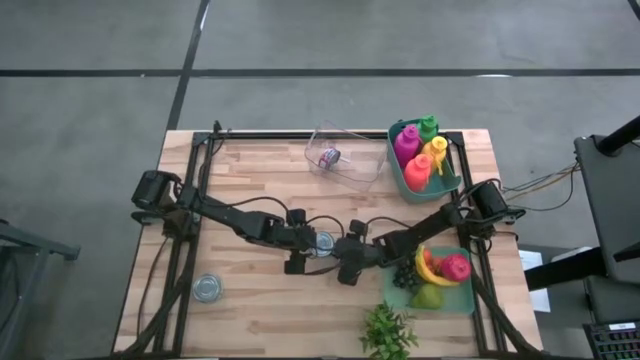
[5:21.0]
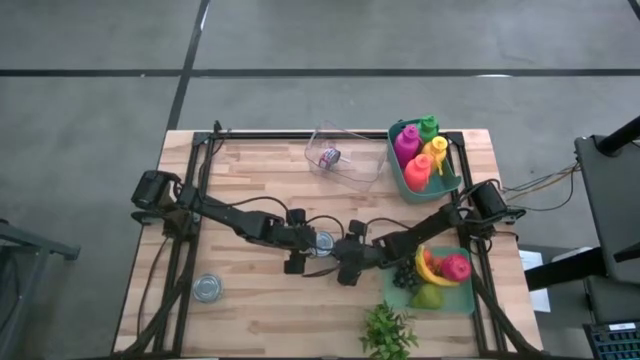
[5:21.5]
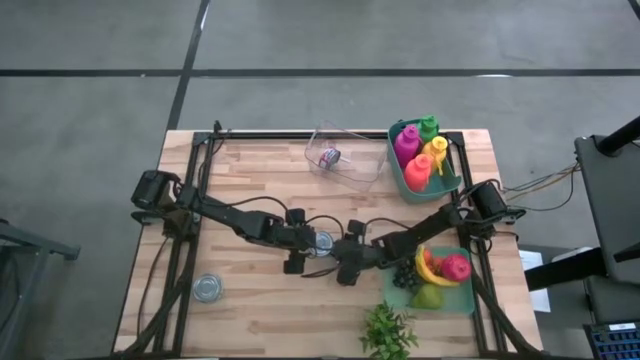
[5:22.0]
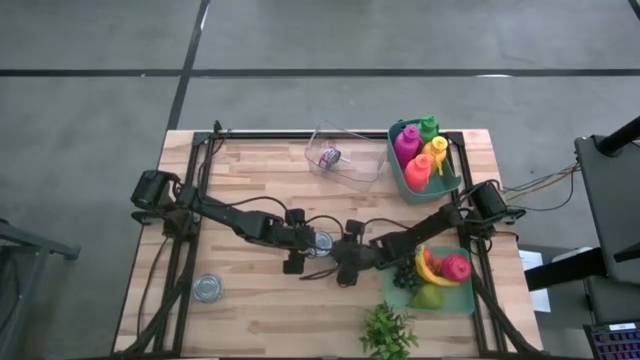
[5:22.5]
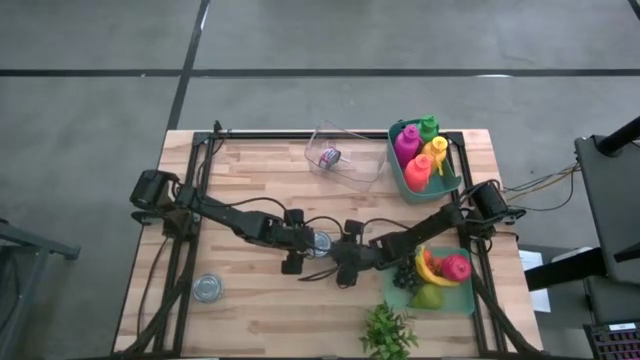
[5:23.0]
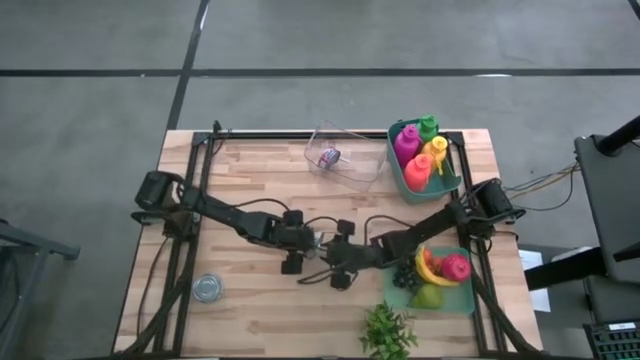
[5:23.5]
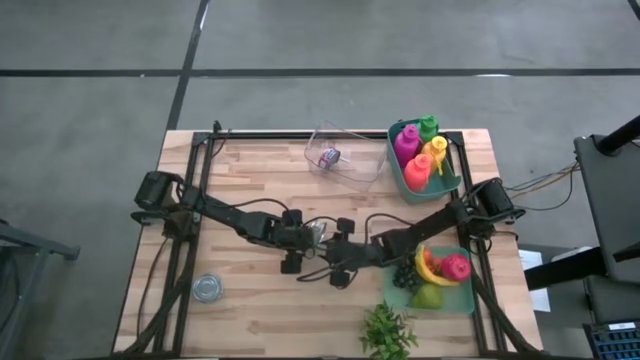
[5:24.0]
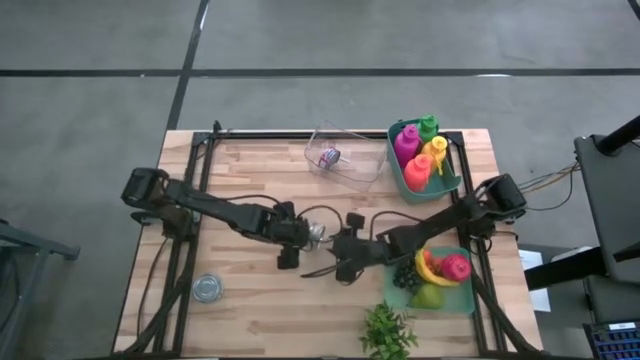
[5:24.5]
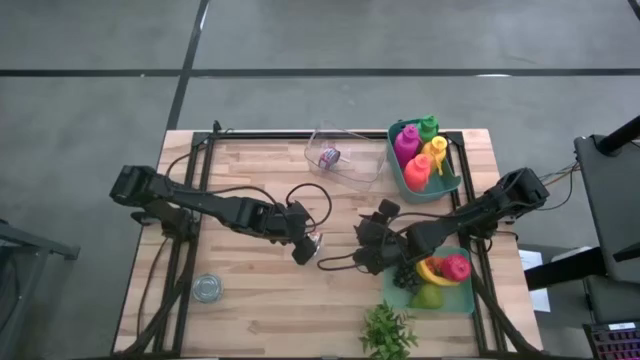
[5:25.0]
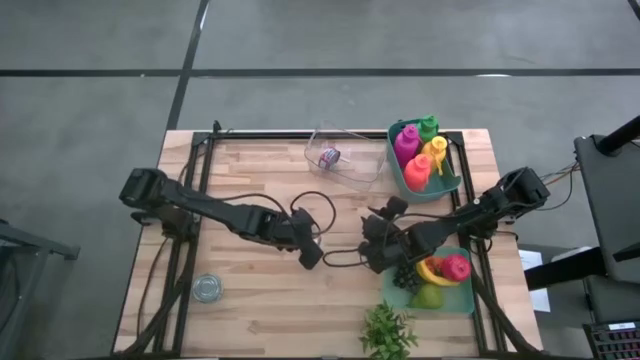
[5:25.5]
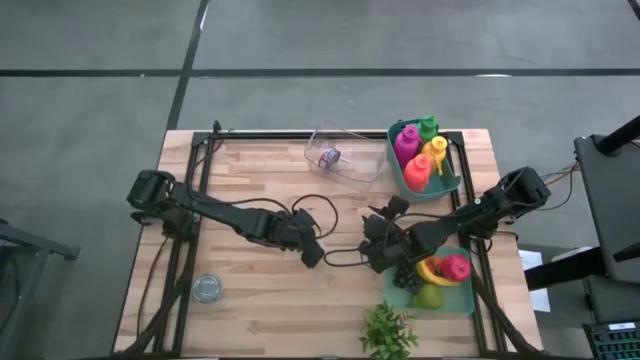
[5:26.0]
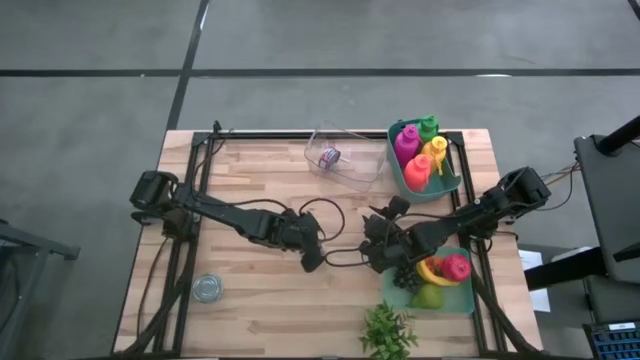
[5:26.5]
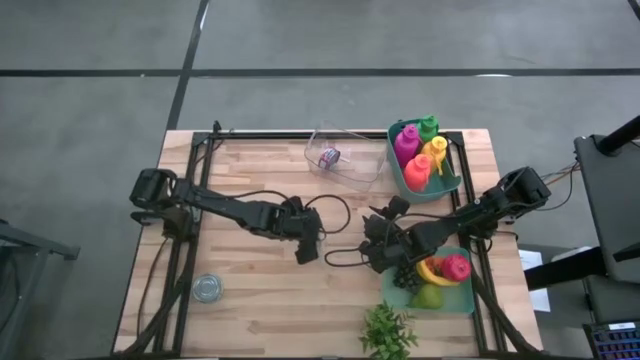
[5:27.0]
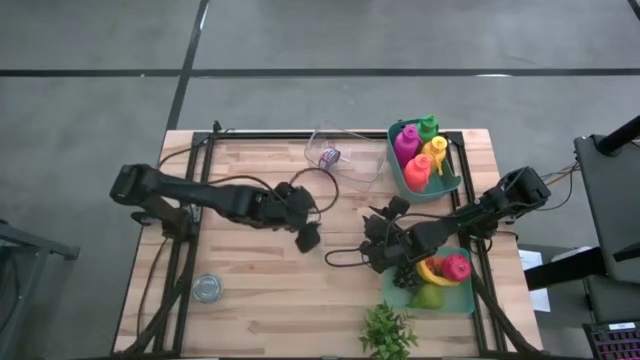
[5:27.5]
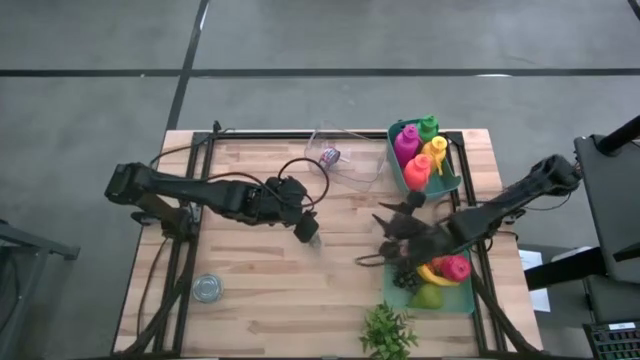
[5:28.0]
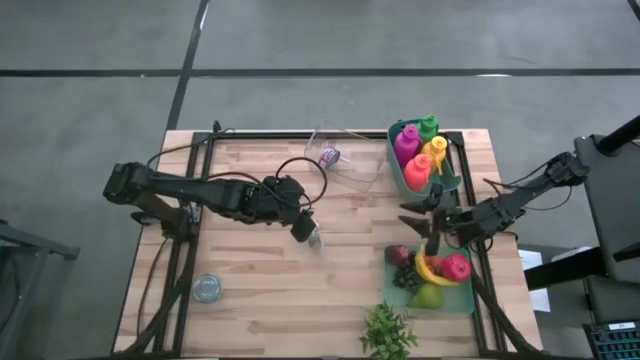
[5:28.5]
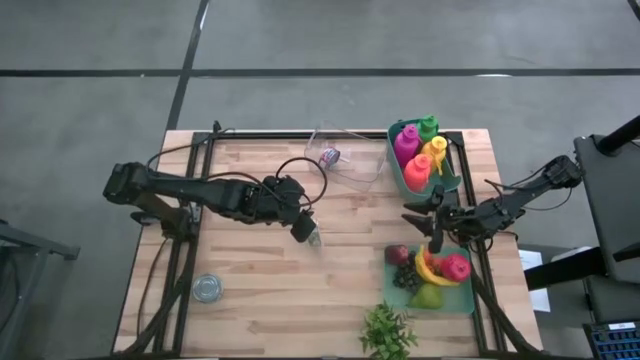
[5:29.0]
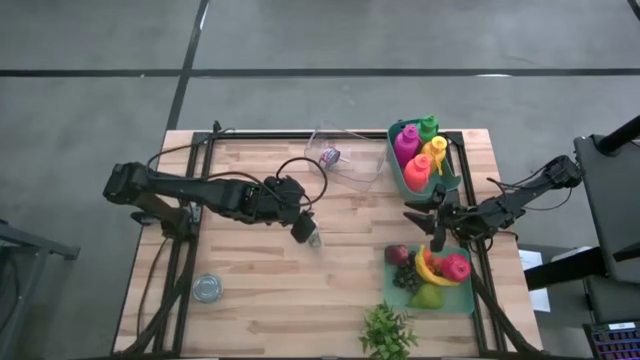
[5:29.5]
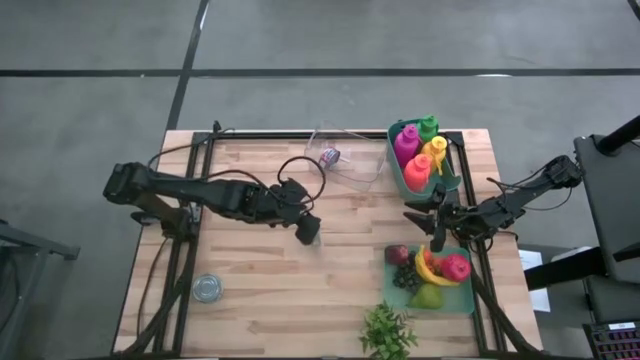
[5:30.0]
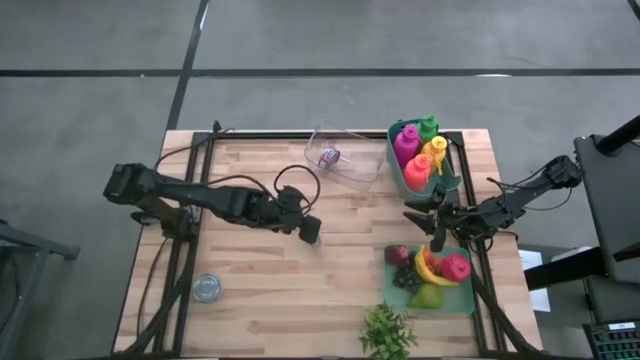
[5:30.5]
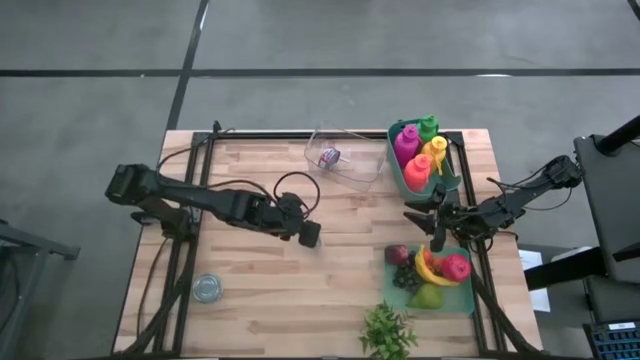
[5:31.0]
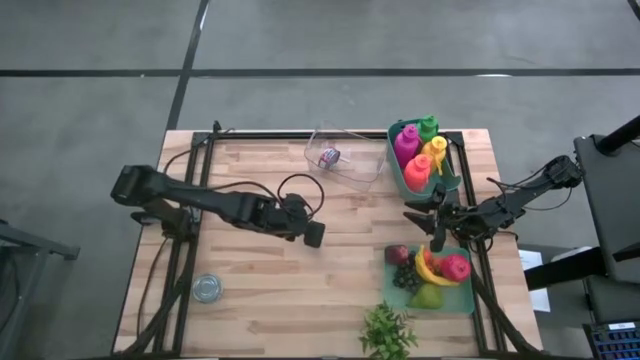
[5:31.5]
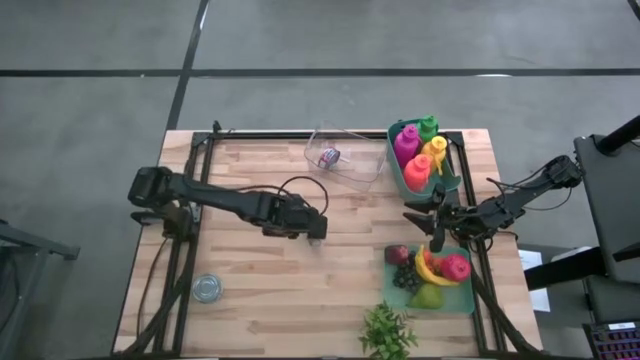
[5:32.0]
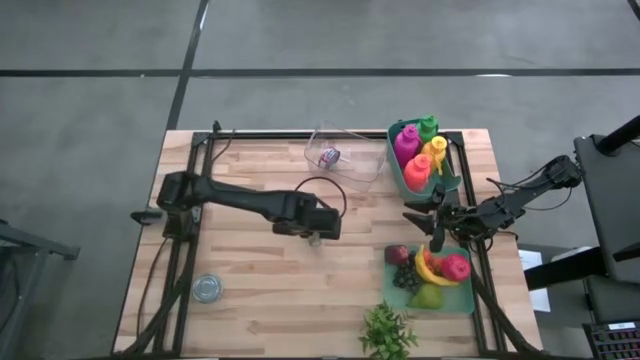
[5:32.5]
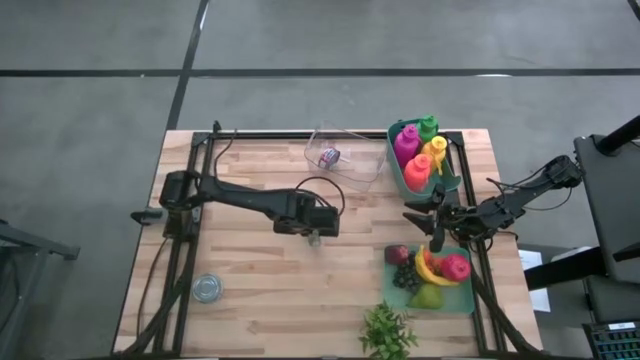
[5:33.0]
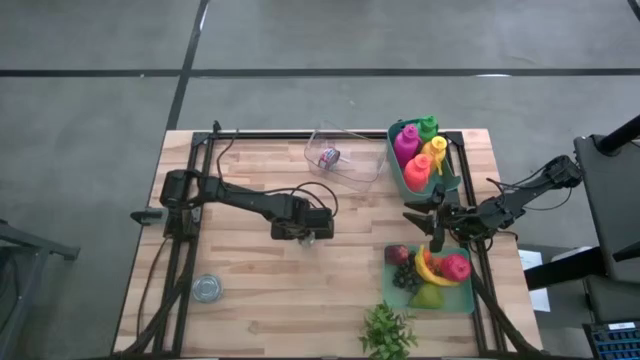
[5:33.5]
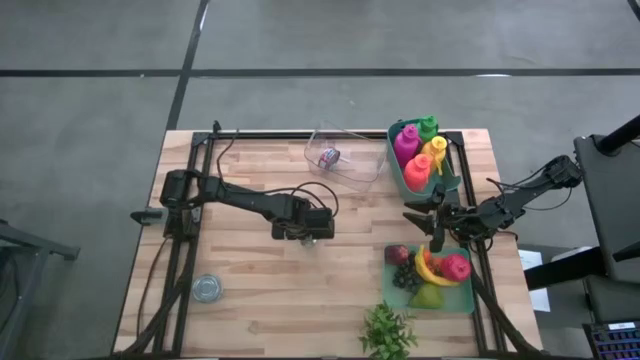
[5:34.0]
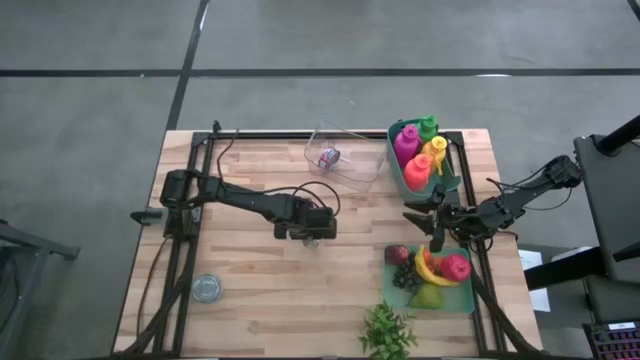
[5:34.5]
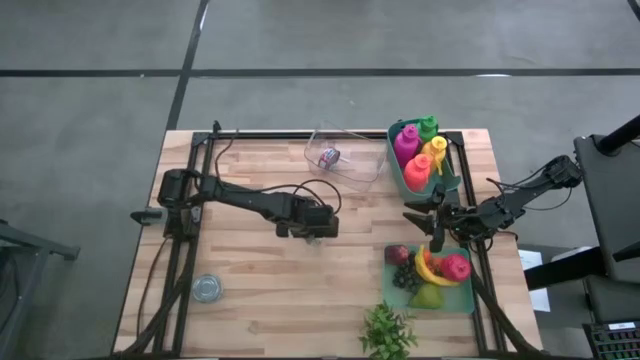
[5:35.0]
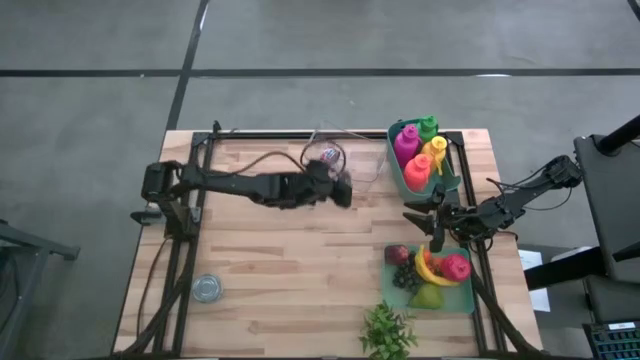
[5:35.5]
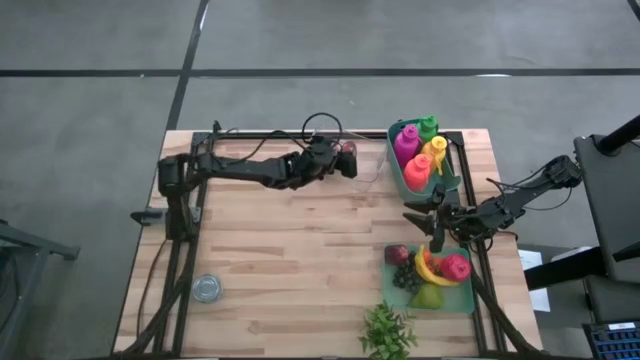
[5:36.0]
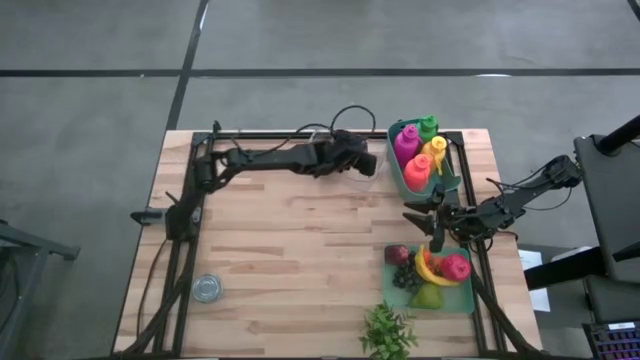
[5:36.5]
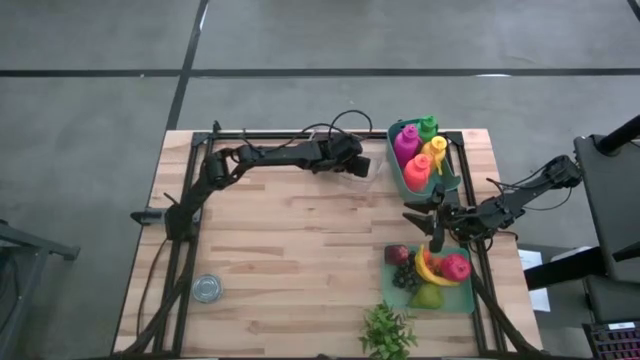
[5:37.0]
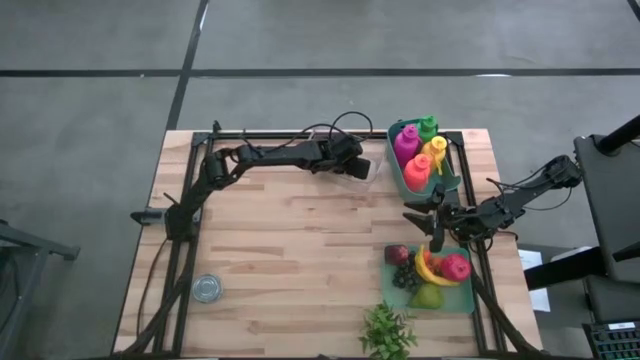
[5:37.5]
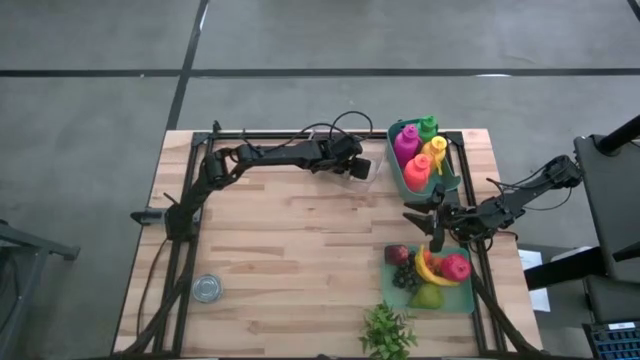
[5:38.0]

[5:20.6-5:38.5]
Task: Pick & Place Food Item
Put the right green tuna can into the transparent bin

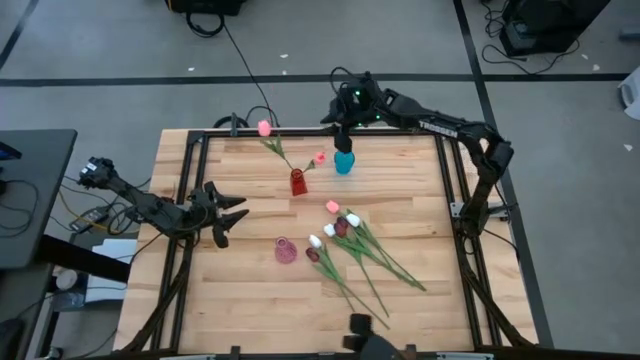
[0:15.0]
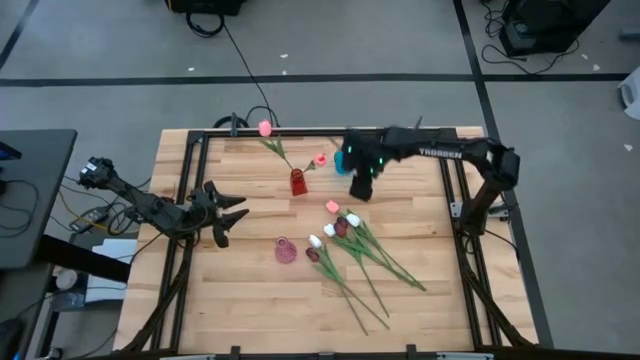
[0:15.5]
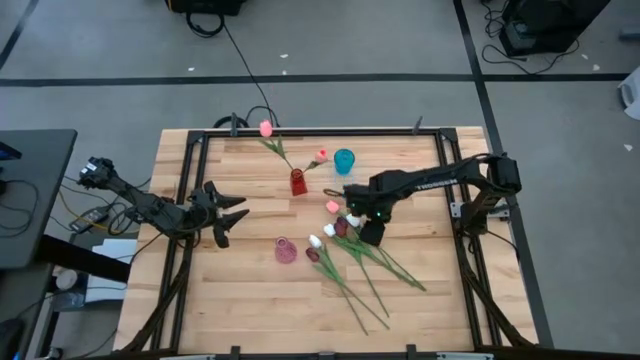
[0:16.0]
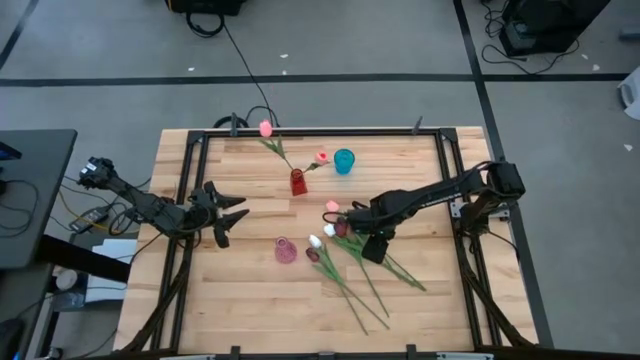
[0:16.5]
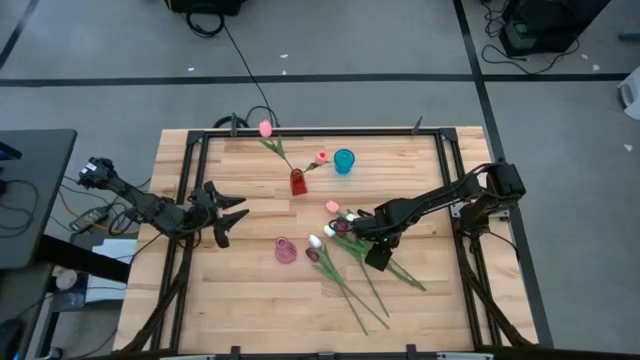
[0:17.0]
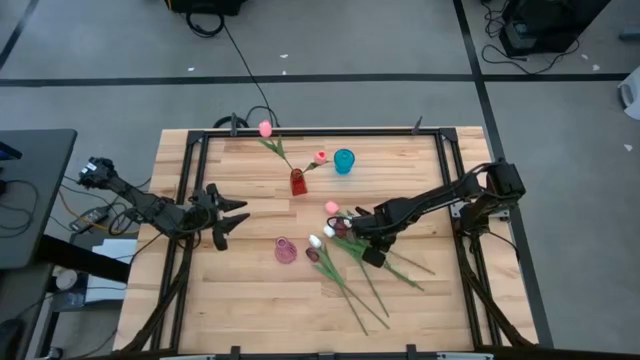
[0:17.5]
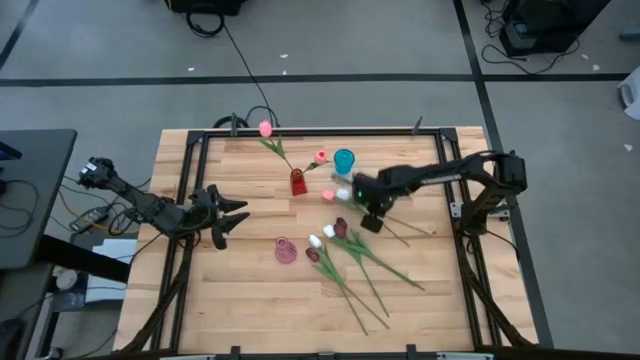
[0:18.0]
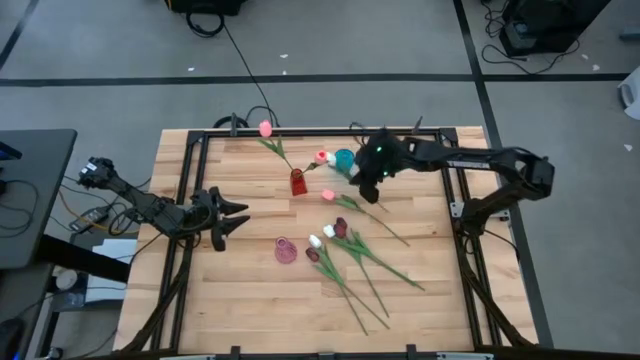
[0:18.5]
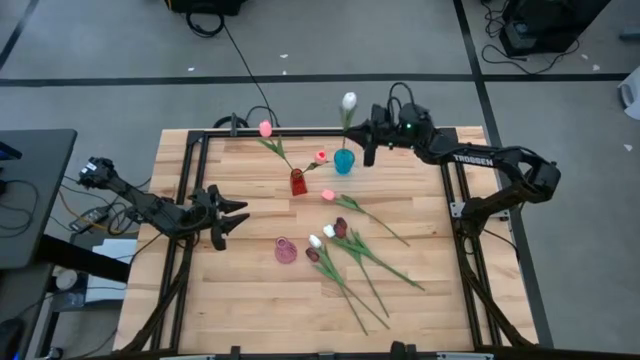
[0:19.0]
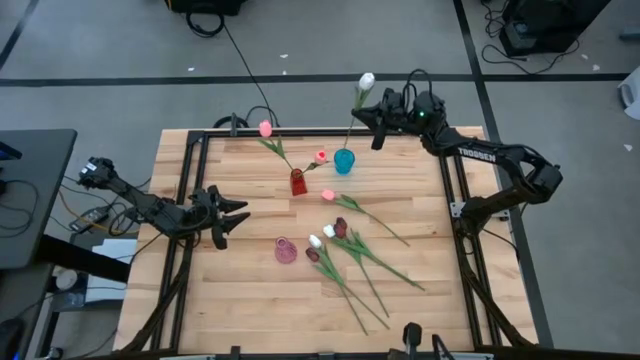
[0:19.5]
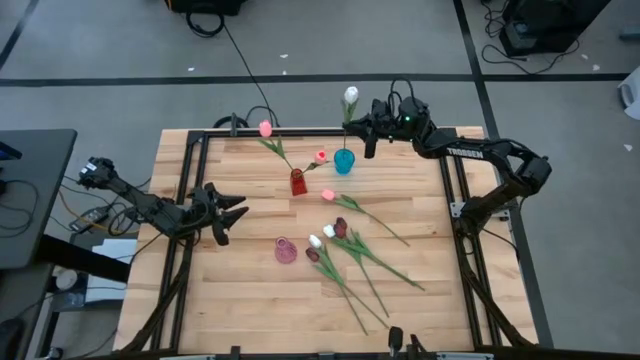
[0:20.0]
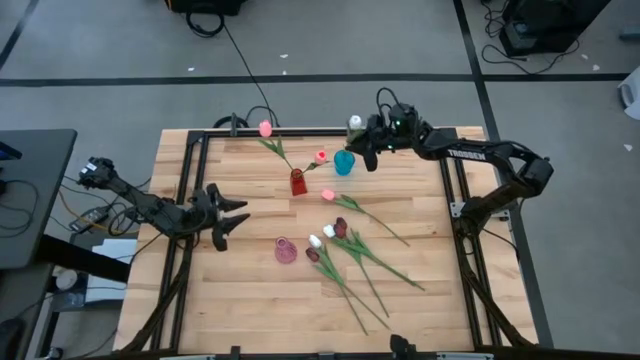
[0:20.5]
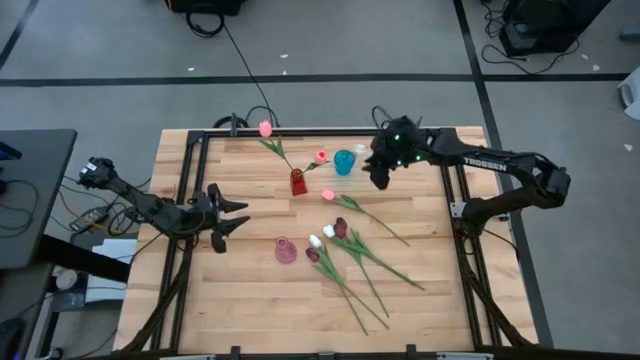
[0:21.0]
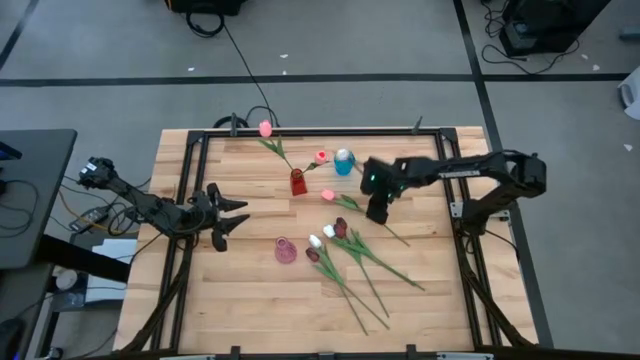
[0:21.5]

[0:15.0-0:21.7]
Task: Sort flowers into vase by color
Put the white flower into the blue vase
